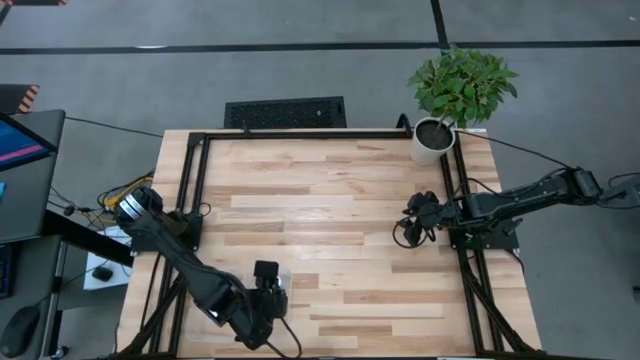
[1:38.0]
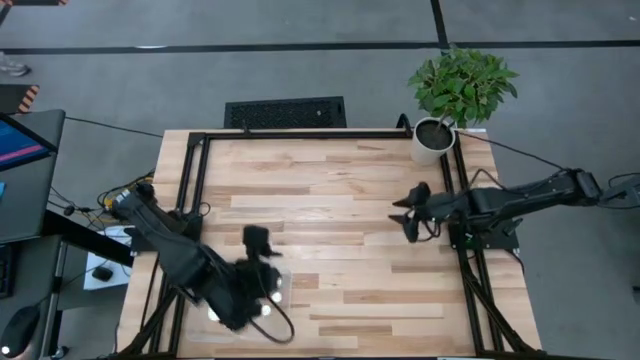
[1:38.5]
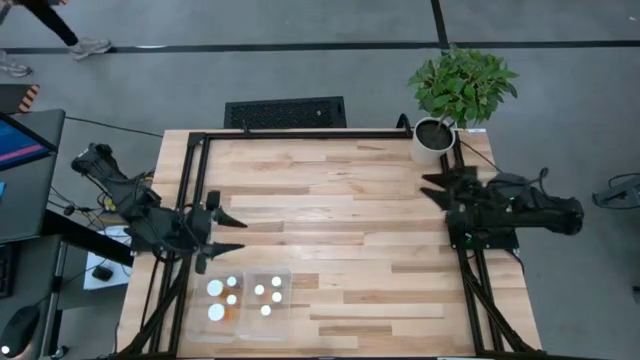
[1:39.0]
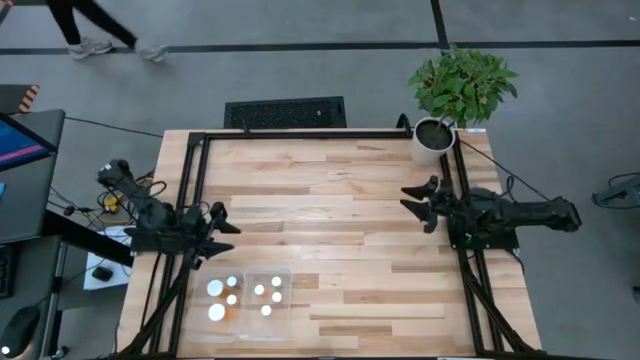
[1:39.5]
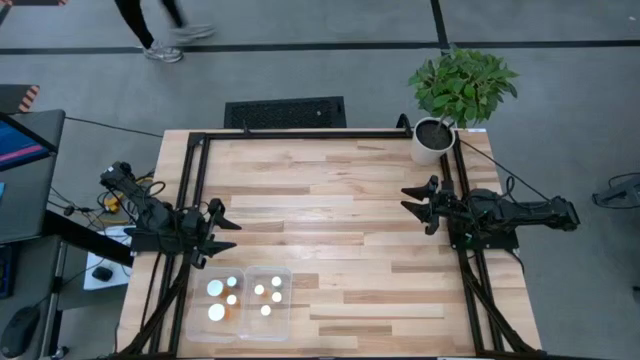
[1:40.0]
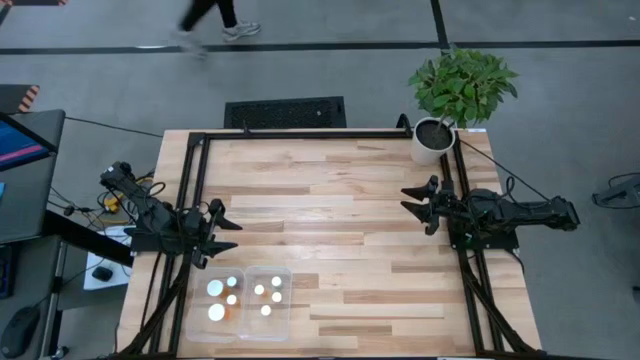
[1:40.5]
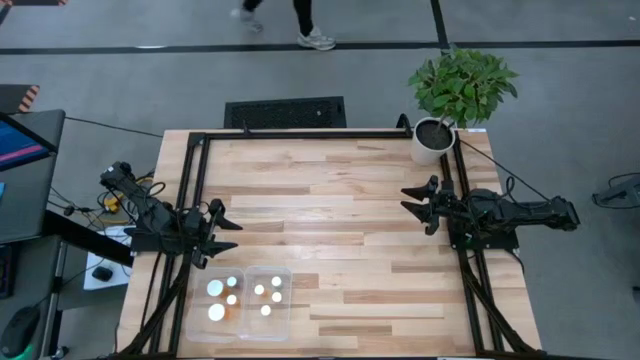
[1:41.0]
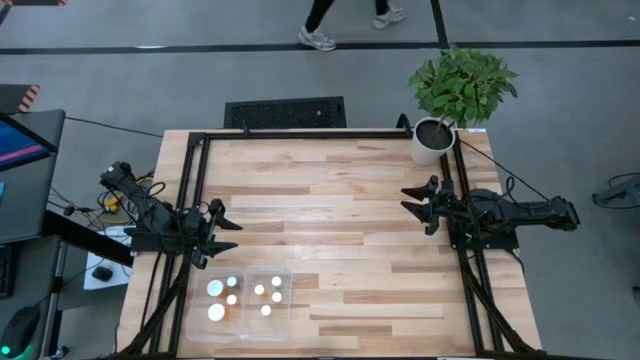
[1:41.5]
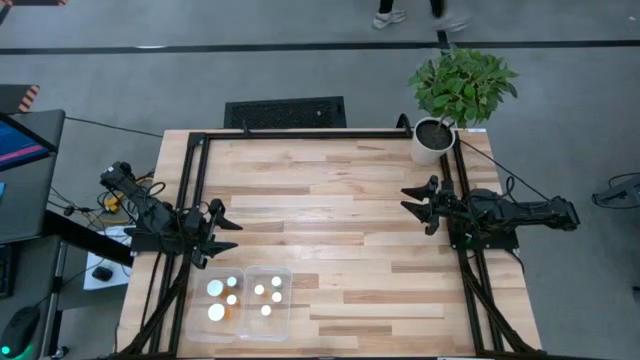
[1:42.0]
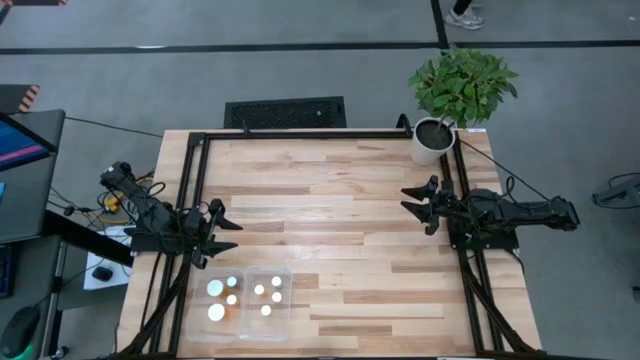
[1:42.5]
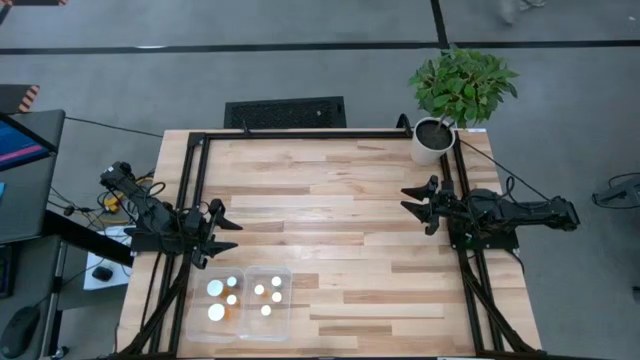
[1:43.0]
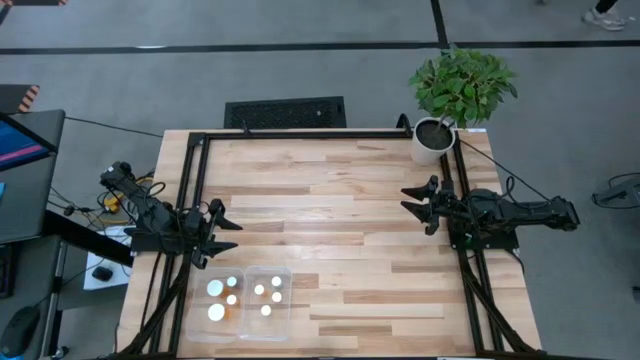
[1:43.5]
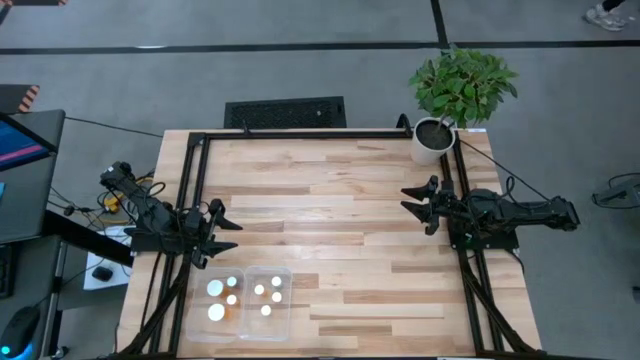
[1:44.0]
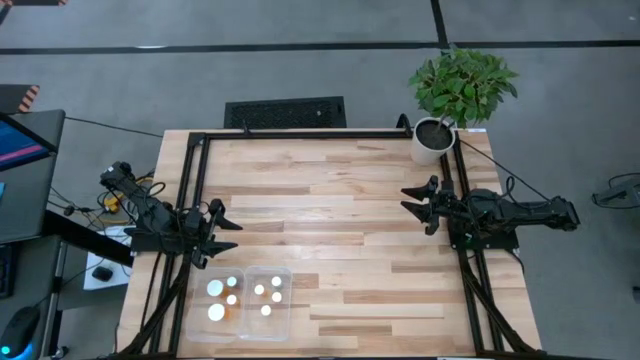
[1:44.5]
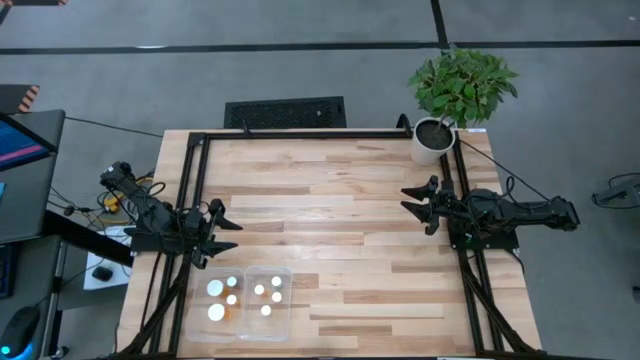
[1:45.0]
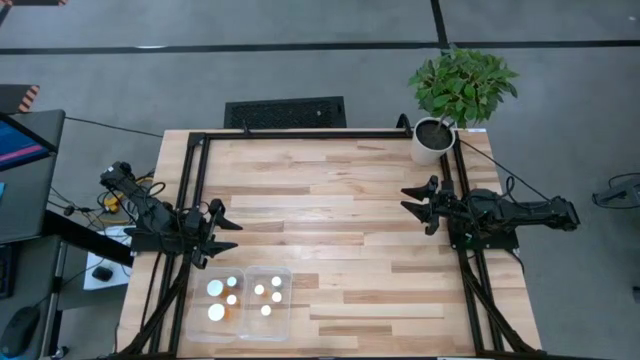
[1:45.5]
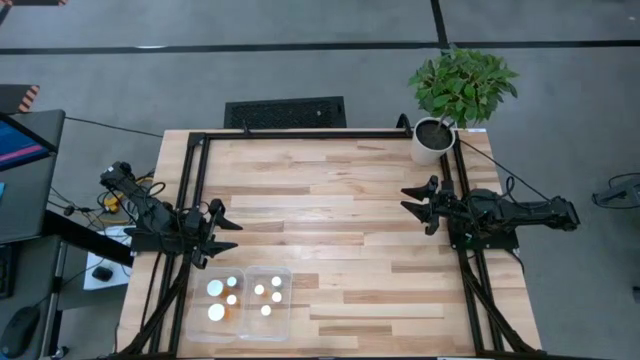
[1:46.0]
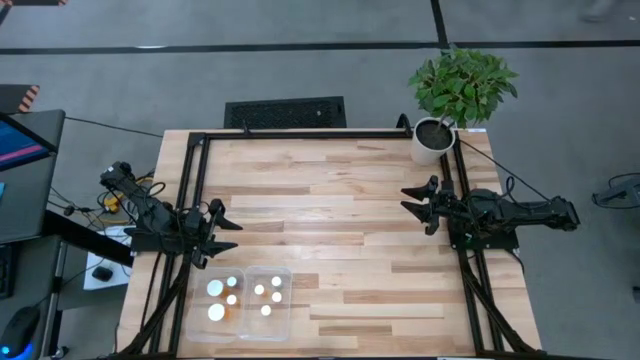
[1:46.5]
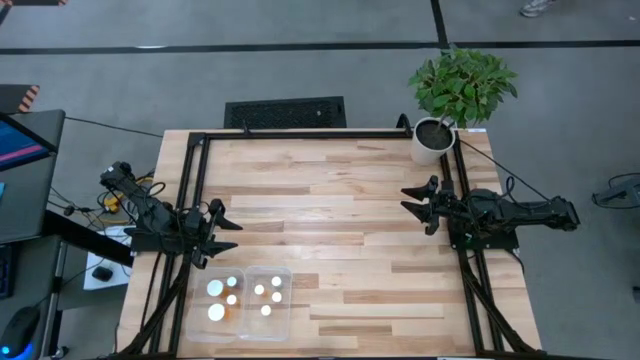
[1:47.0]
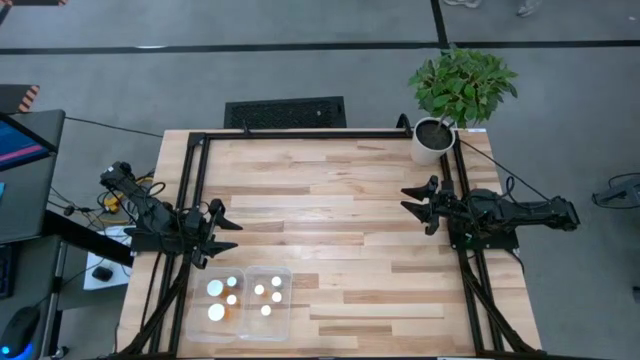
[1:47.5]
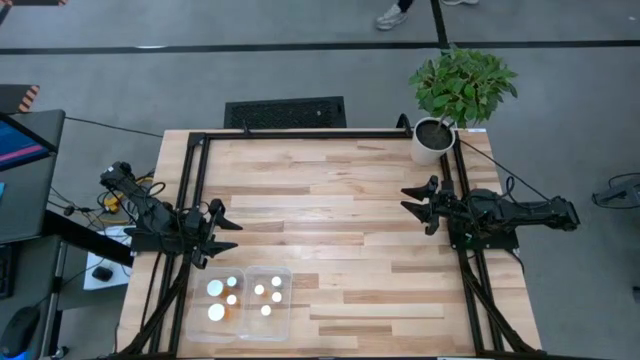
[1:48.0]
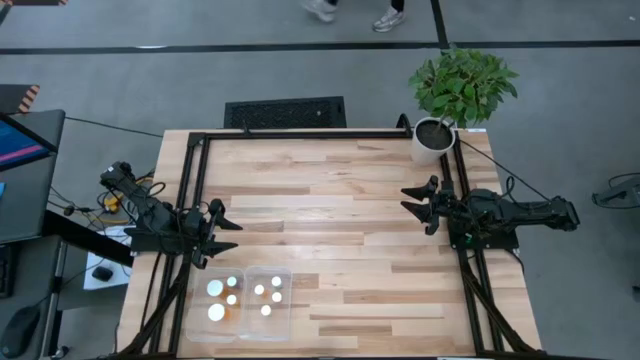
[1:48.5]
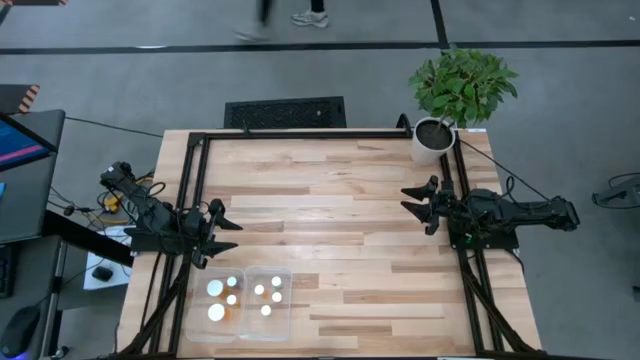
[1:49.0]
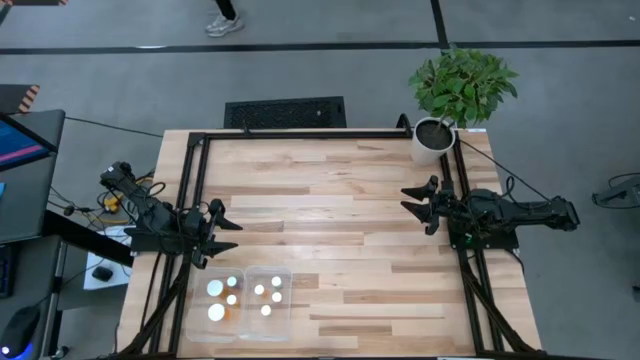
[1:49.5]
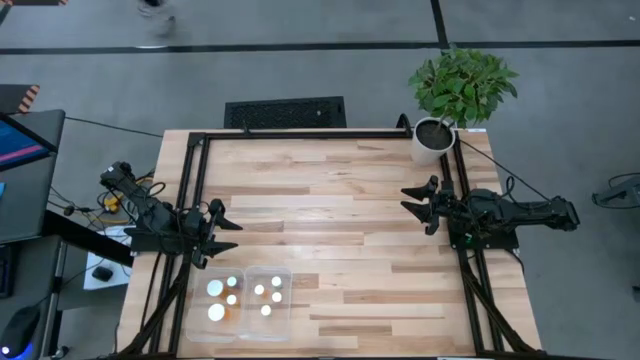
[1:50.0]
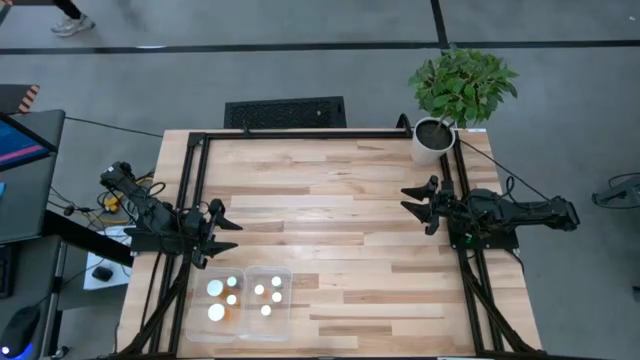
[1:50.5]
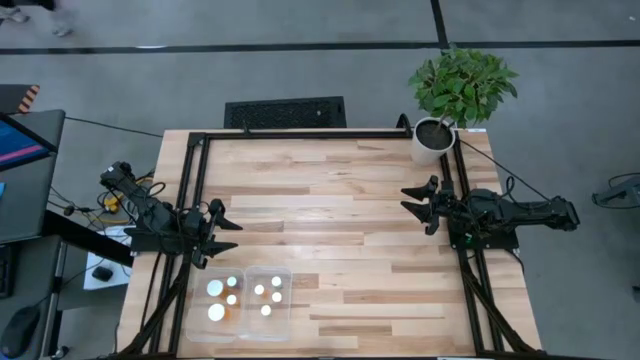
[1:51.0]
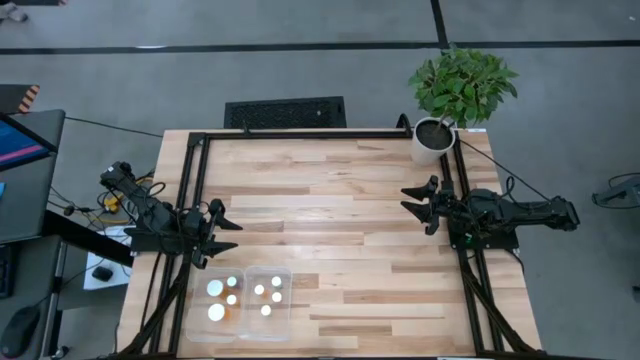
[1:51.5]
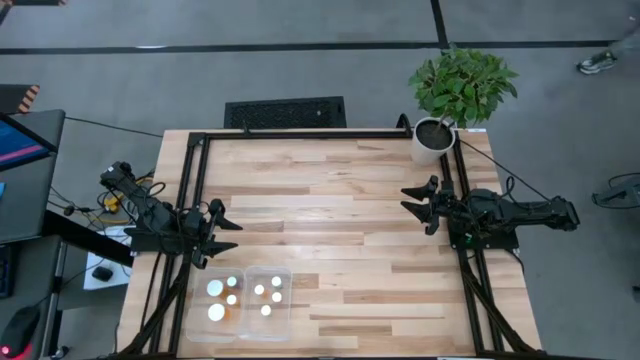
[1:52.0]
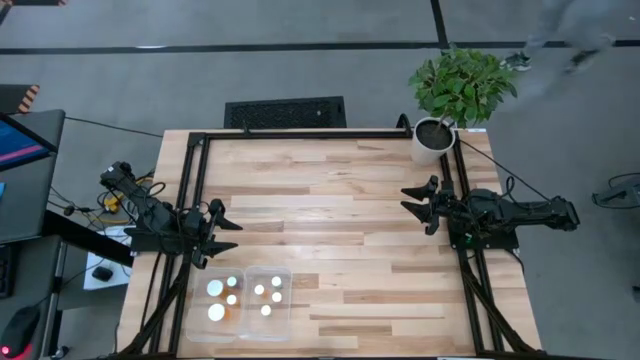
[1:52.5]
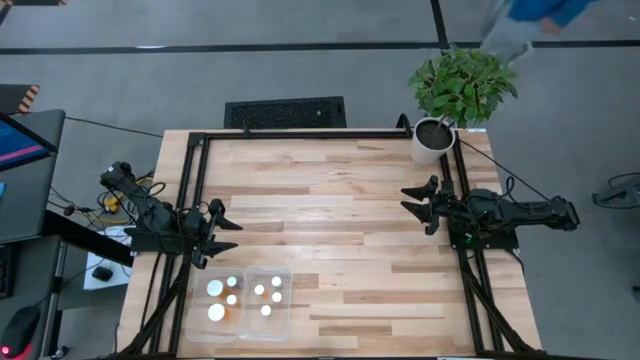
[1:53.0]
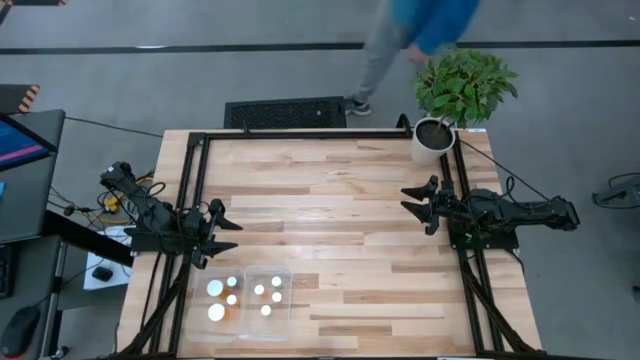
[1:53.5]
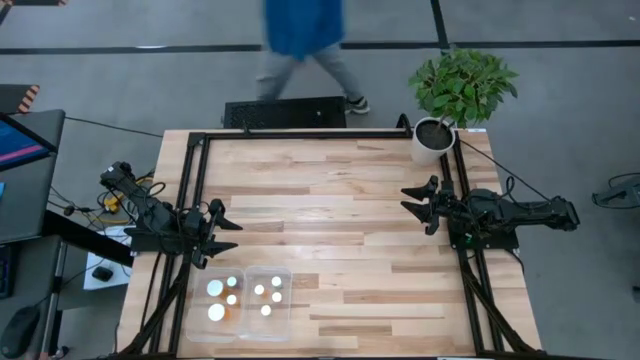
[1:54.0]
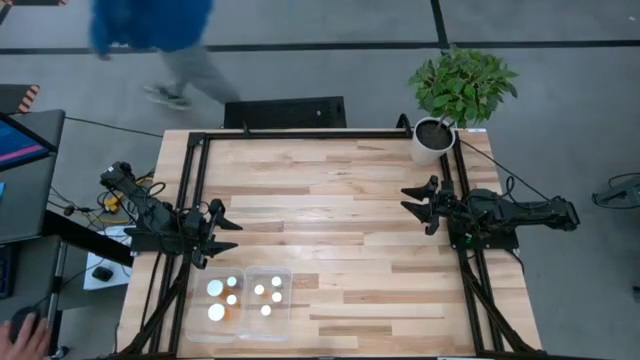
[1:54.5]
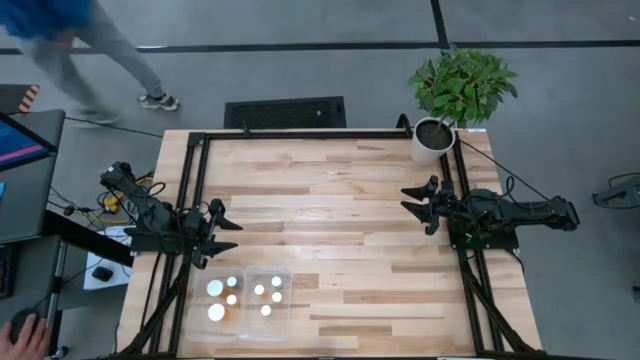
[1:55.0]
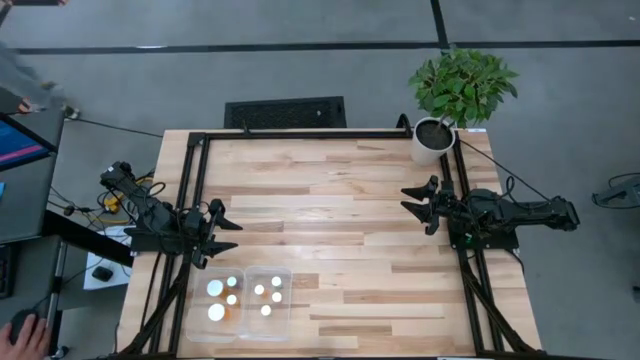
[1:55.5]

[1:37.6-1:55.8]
Task: Pick and place medicine bottles into bin by pill shape (circle, oval)
Return to Home Position
